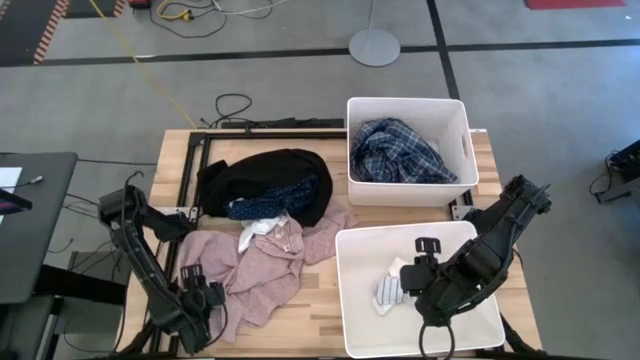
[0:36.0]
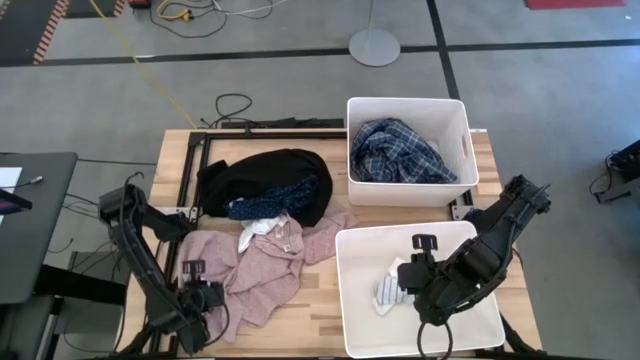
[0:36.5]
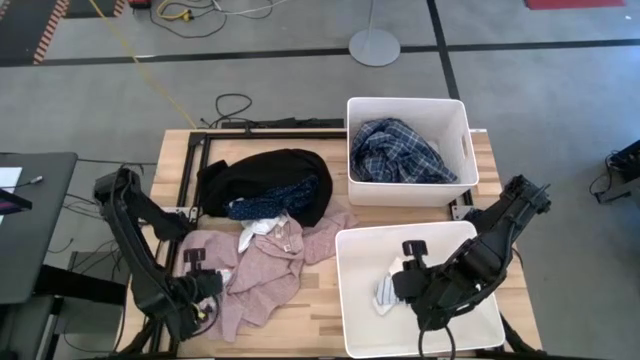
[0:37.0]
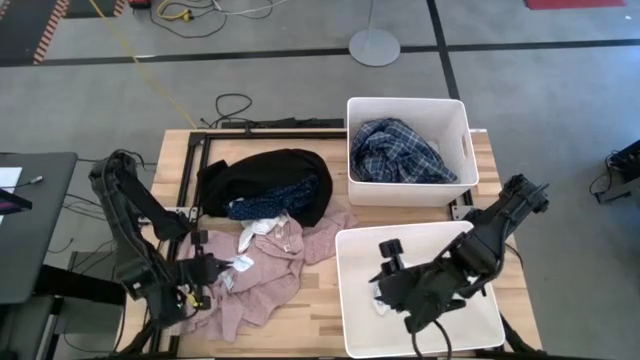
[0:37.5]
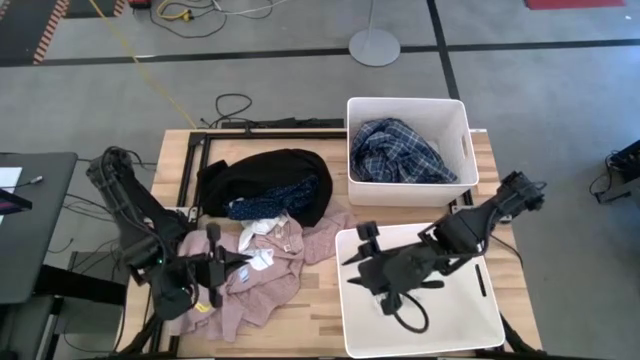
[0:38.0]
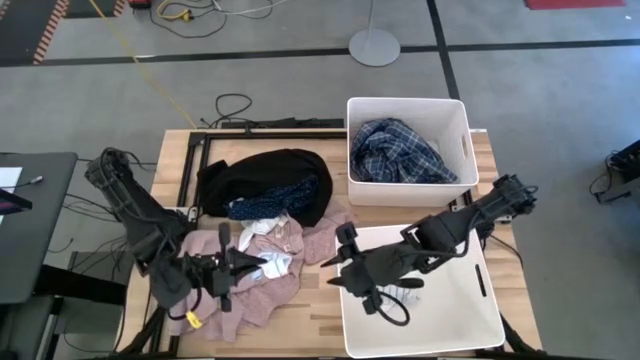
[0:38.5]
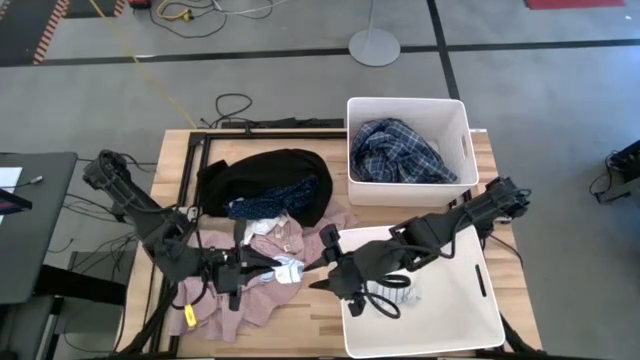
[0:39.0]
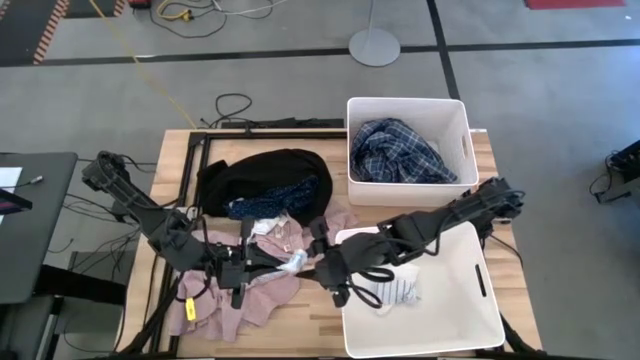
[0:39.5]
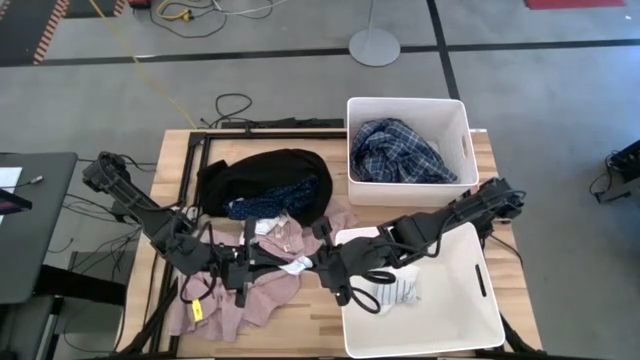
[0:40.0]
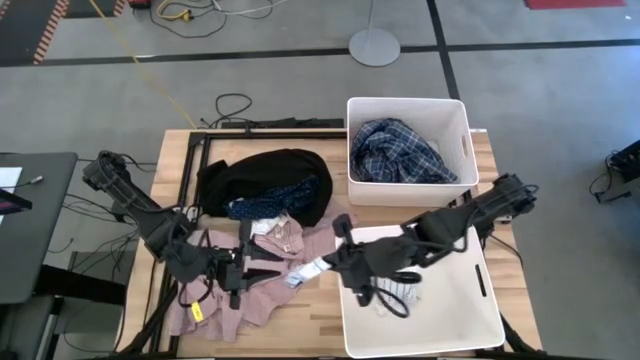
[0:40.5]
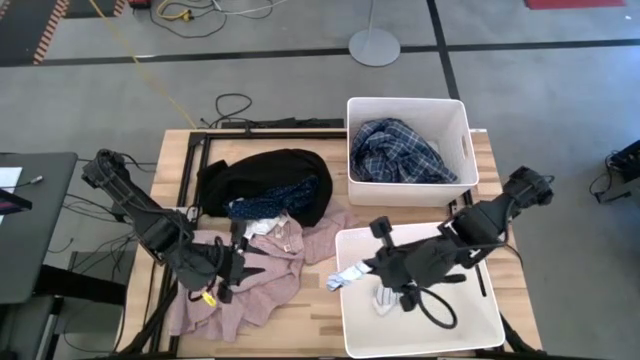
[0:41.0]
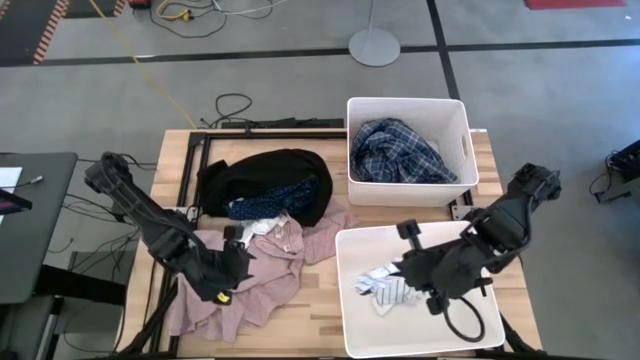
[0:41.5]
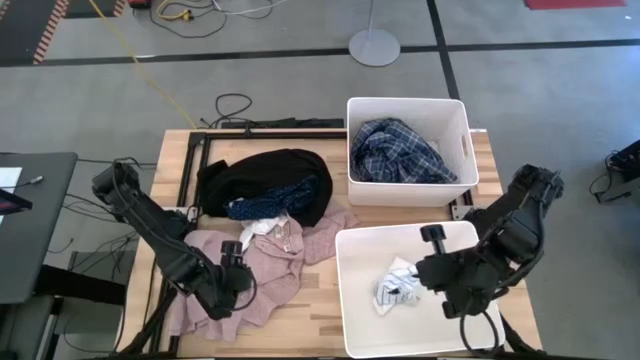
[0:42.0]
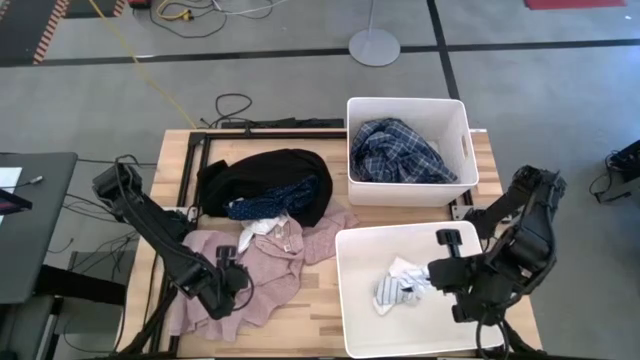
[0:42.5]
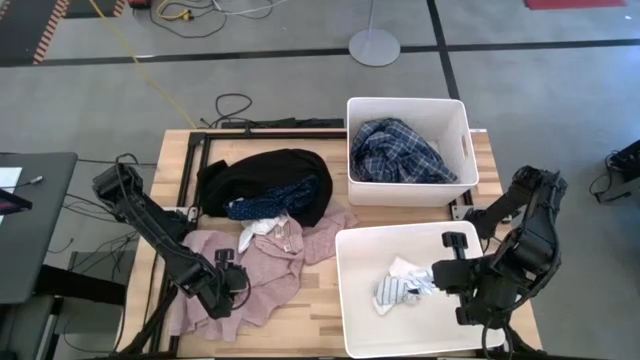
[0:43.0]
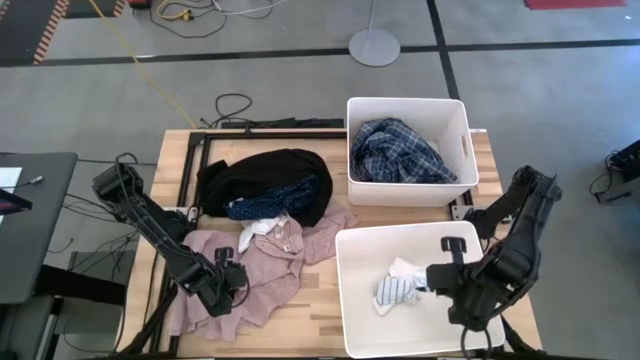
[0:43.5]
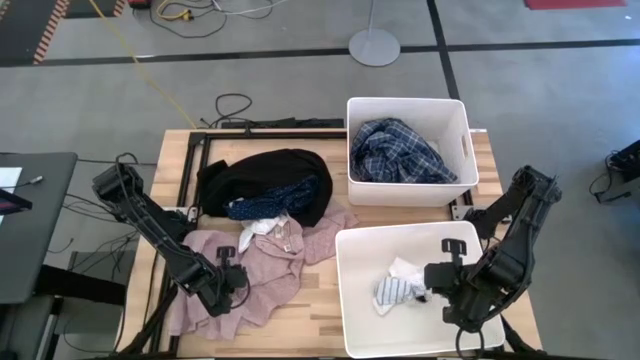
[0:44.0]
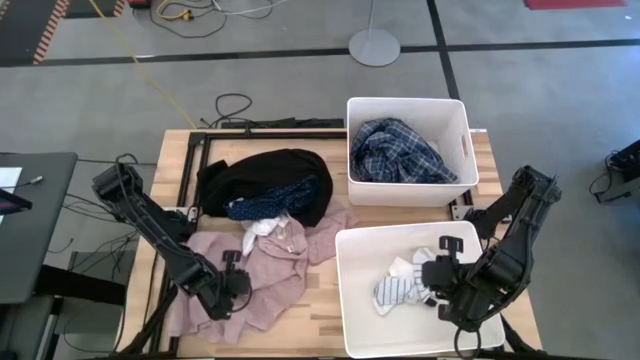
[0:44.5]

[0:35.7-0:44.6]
Task: Sort clothes
Put the striped white sock into the bottom white laundry bin

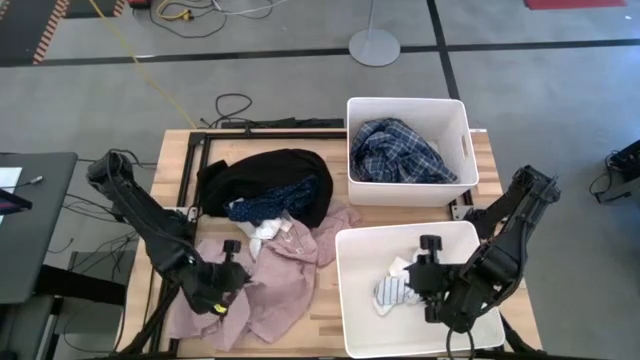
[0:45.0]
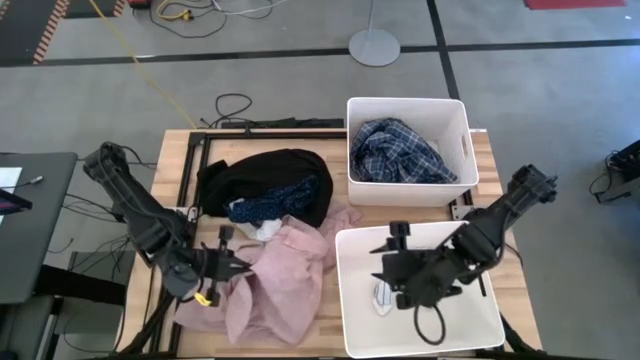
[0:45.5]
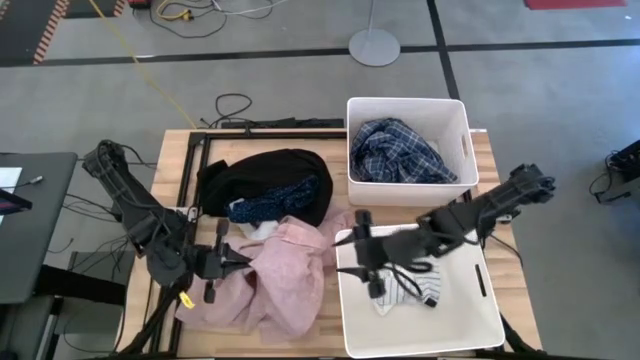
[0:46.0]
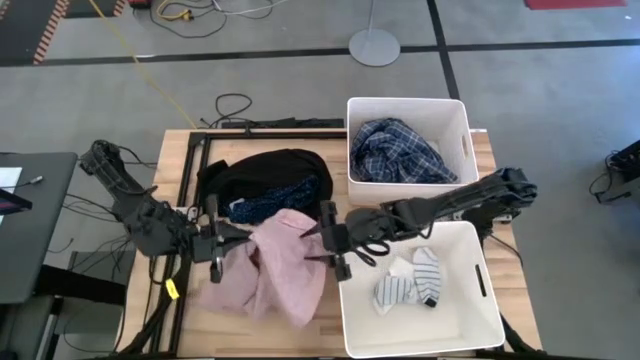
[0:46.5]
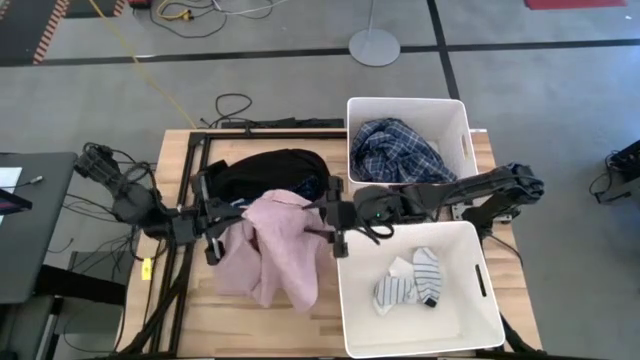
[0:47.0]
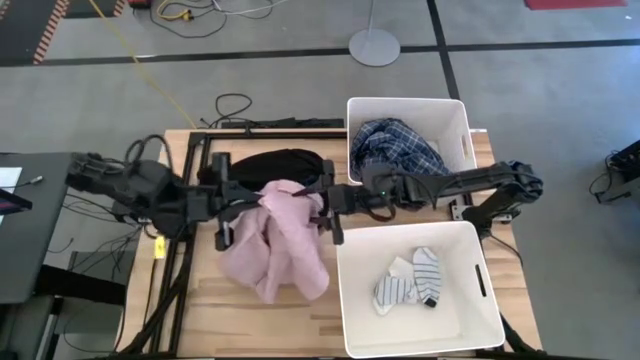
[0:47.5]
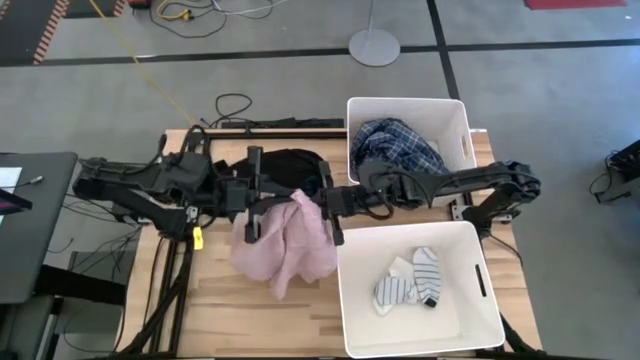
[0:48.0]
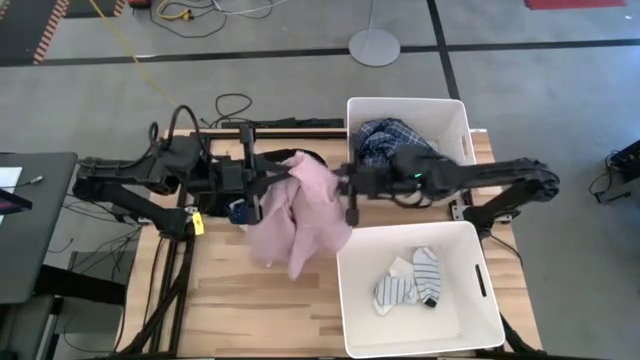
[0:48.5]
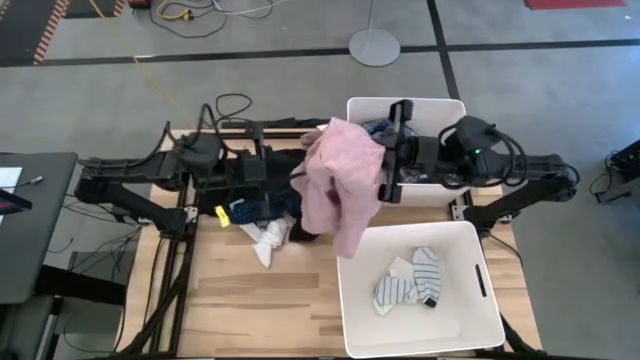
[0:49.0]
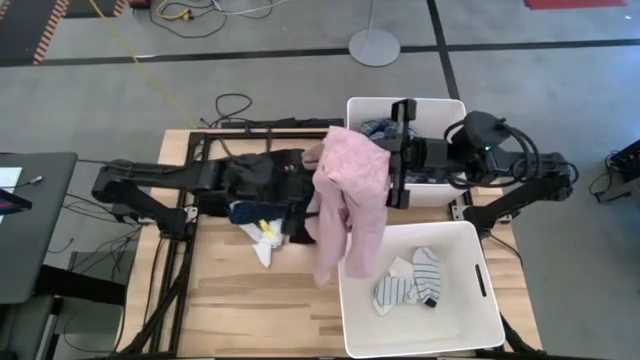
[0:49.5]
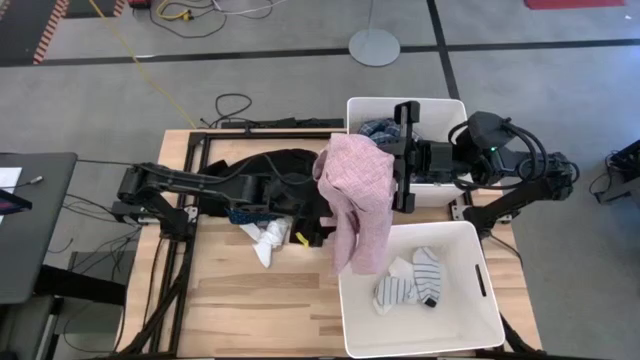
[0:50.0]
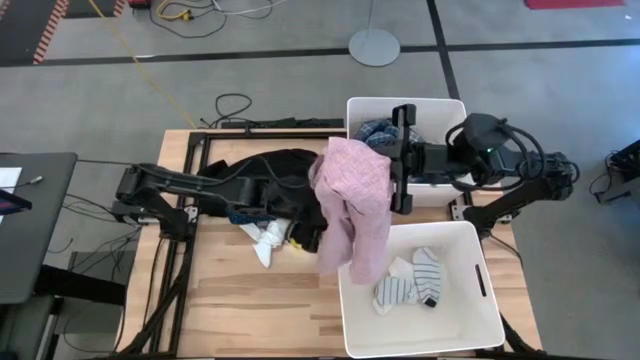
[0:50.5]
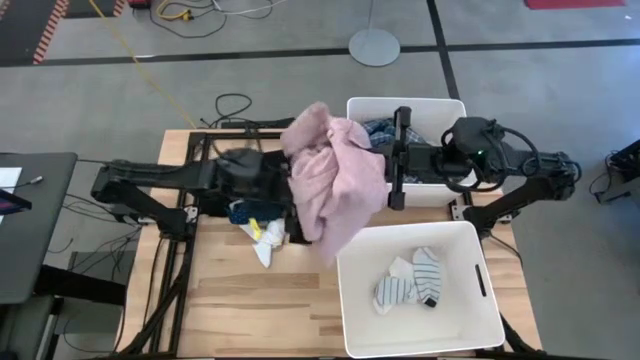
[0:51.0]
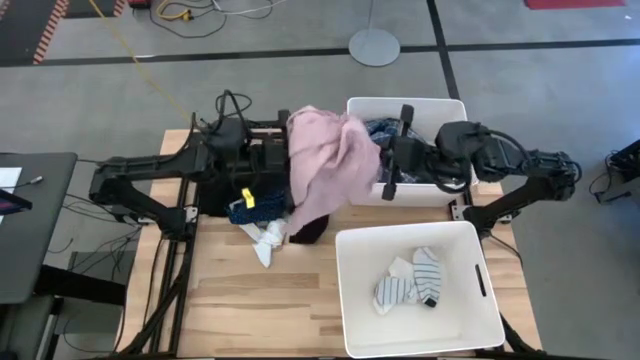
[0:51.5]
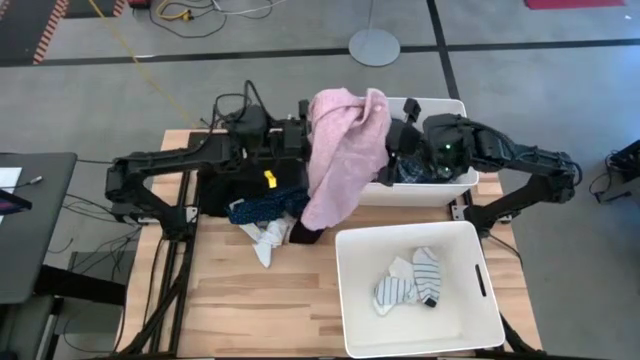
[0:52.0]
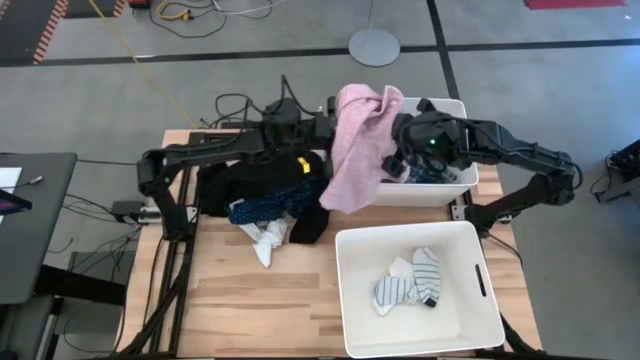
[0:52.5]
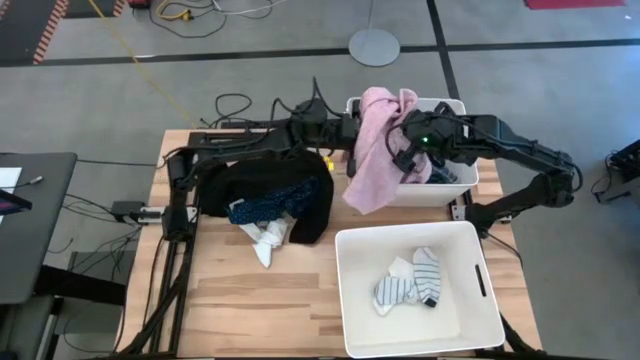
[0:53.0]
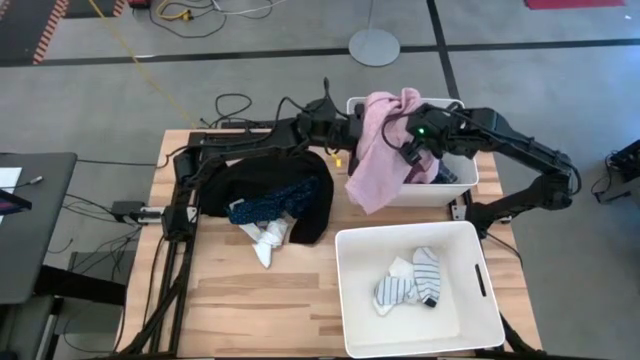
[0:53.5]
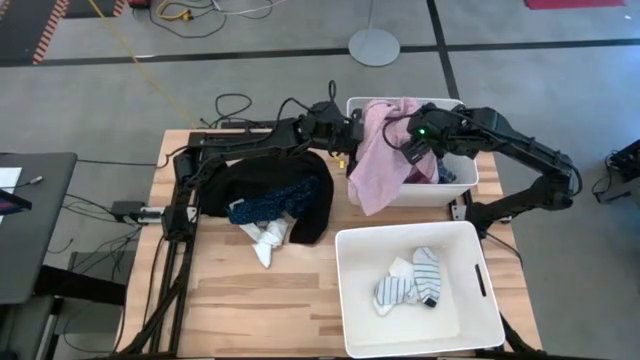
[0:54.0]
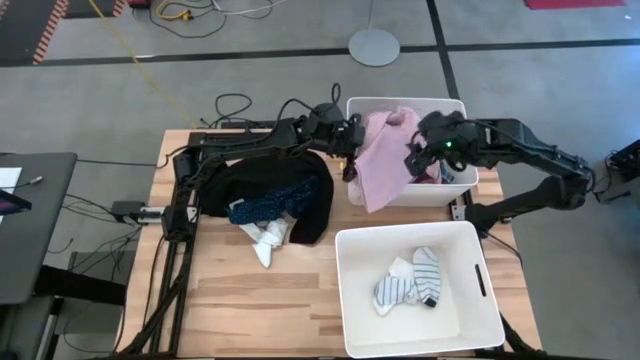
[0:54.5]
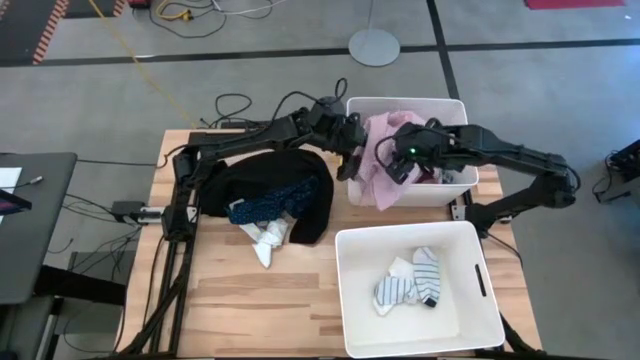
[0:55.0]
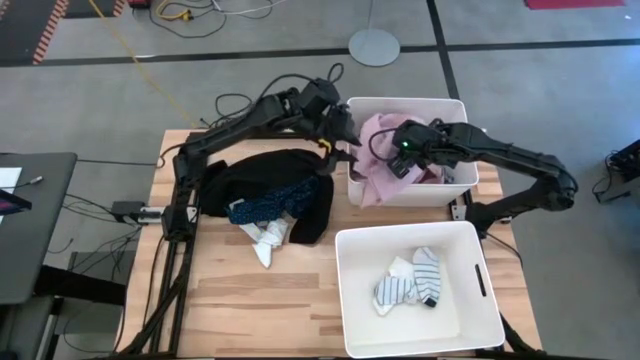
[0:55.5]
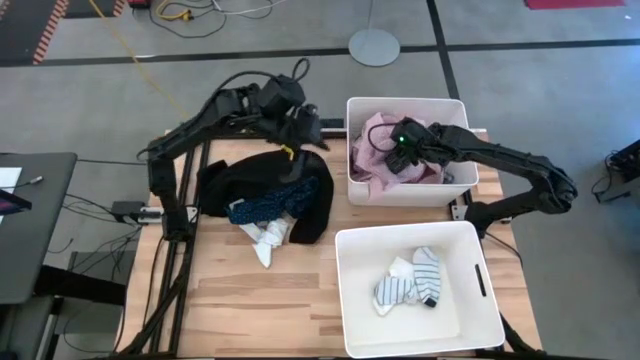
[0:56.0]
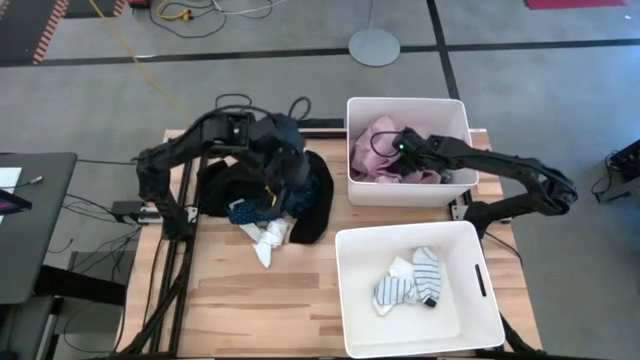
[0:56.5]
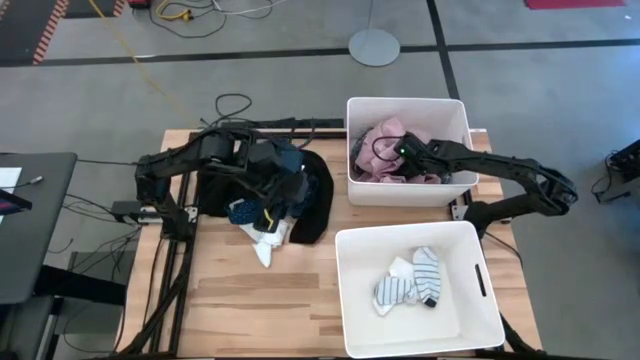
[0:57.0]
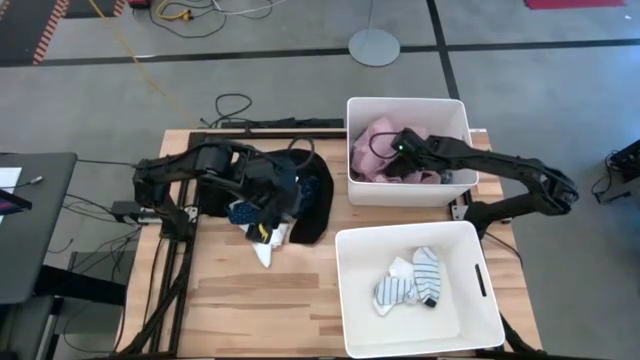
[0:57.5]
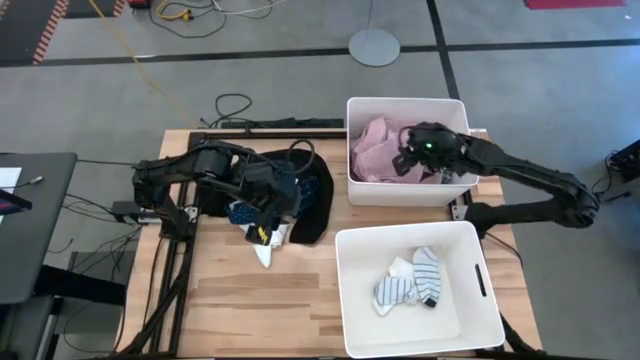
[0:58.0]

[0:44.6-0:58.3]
Put the pink polo shirt into the top white laundry bin
